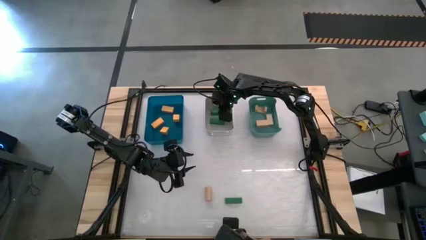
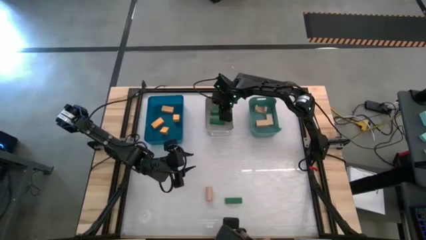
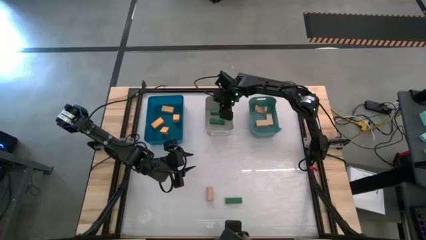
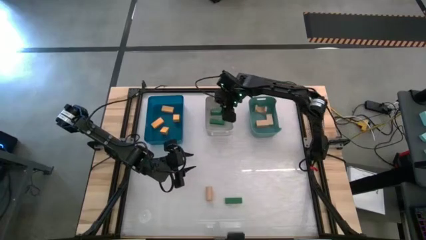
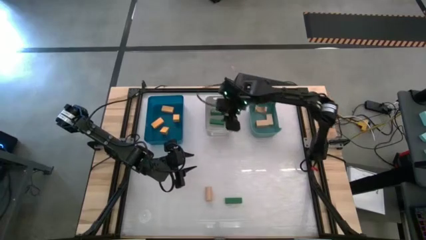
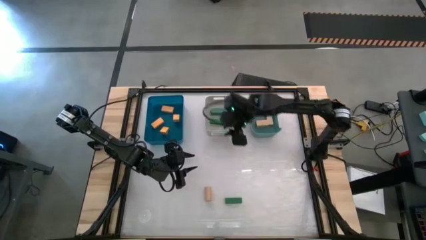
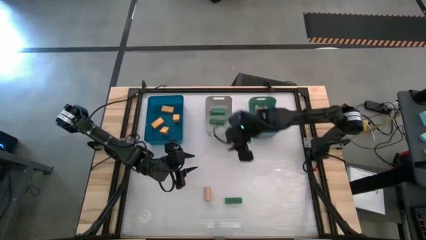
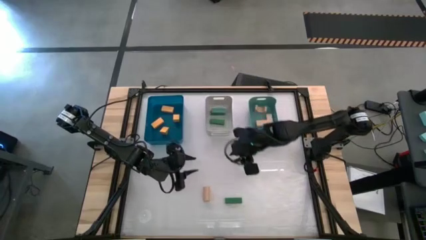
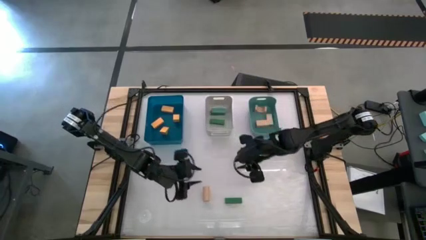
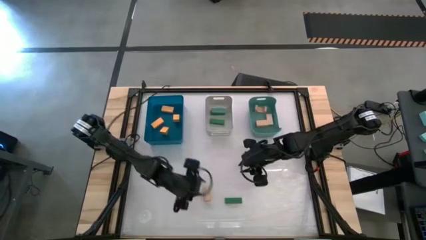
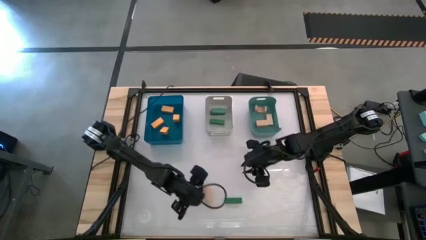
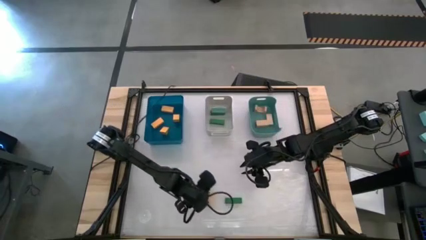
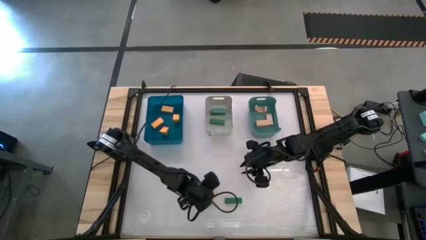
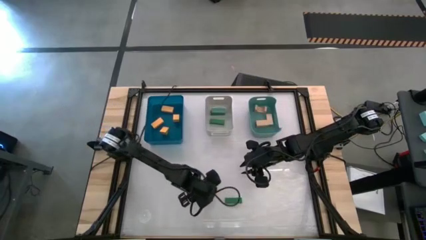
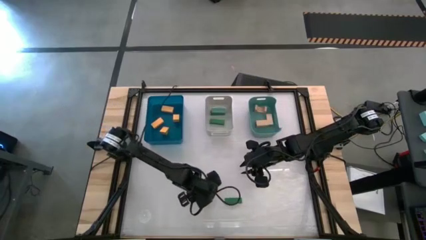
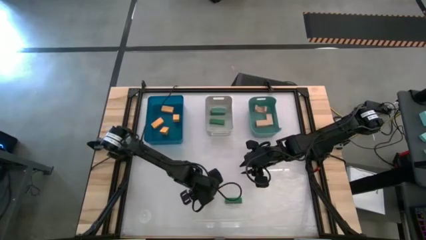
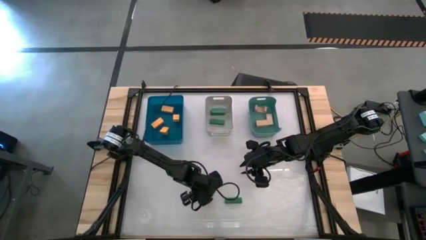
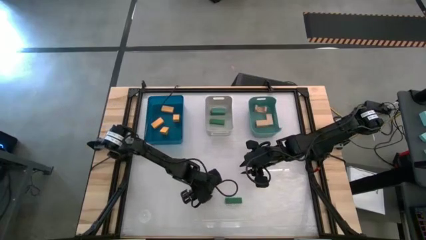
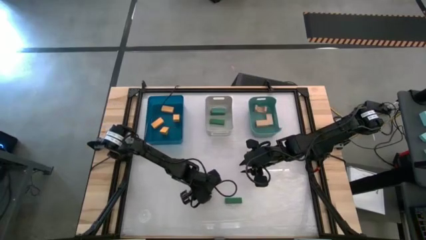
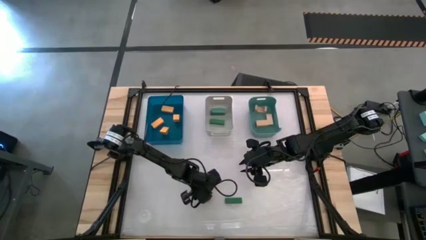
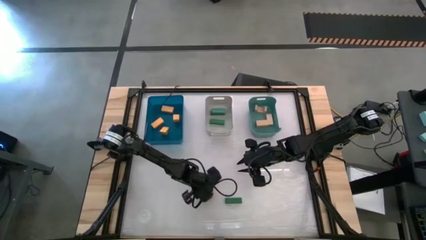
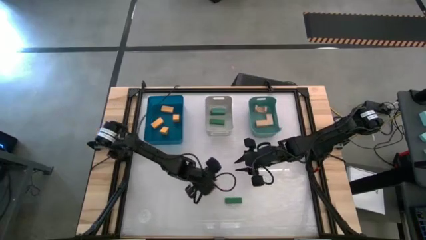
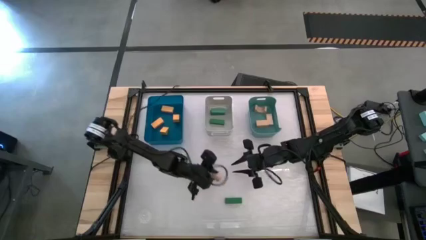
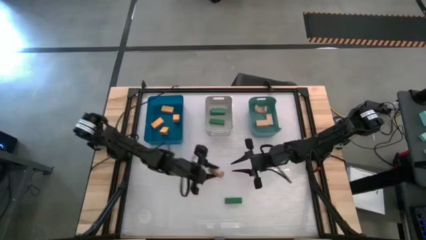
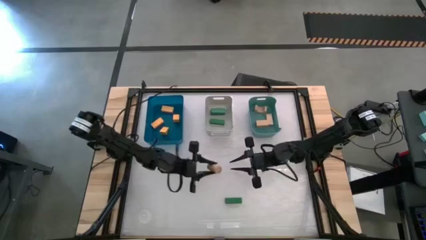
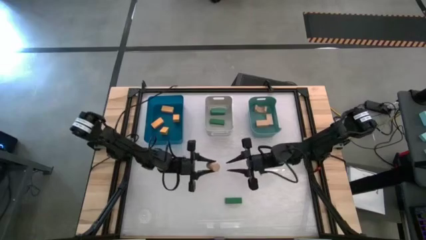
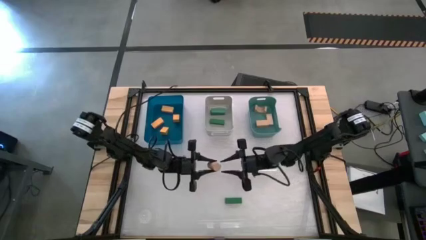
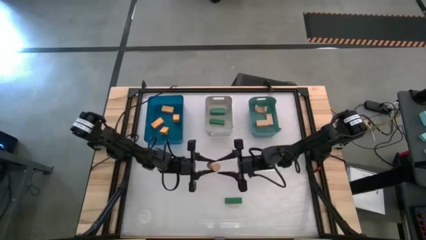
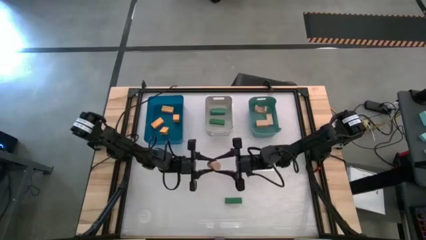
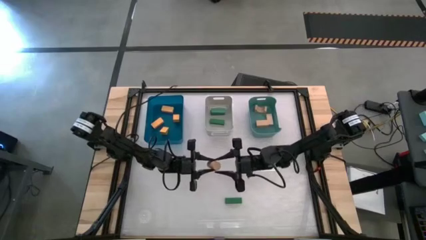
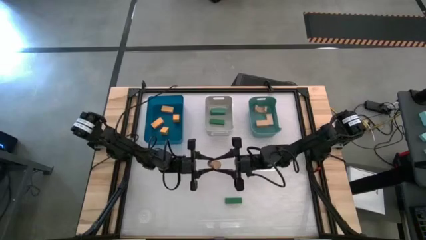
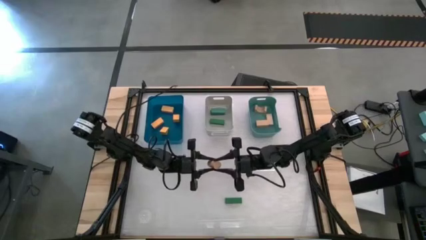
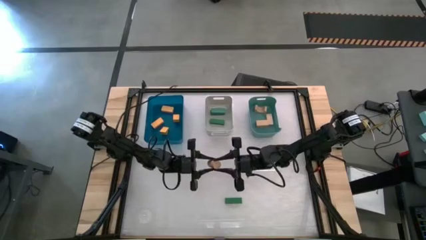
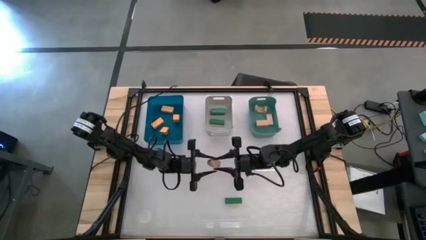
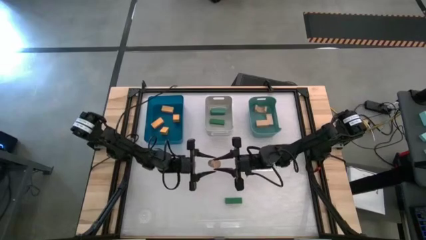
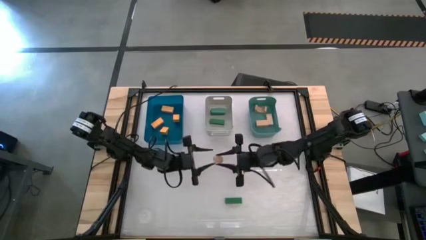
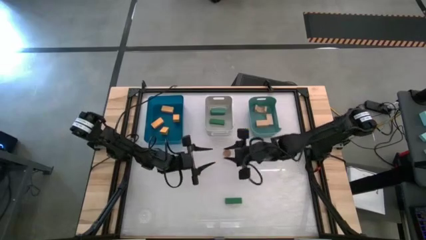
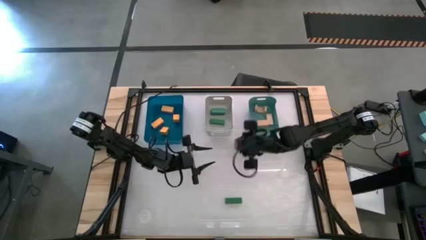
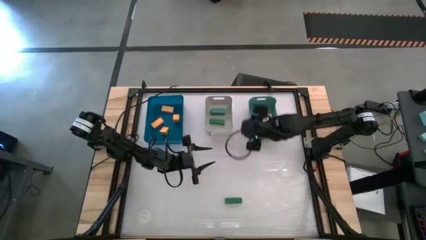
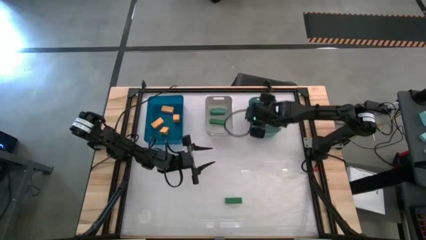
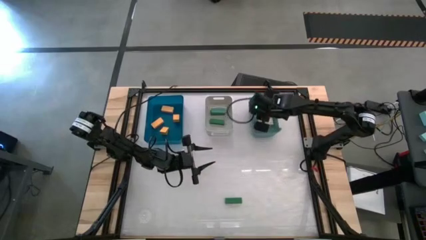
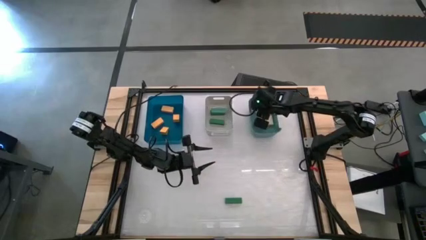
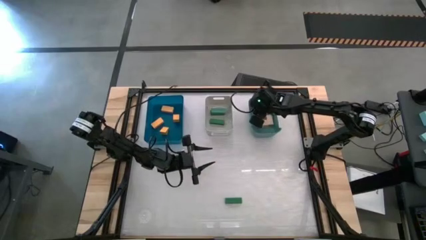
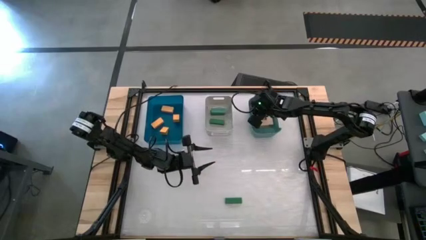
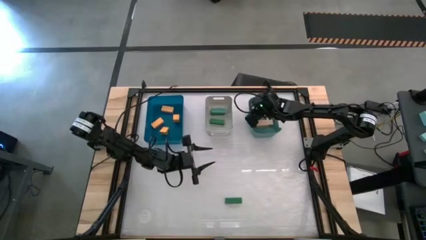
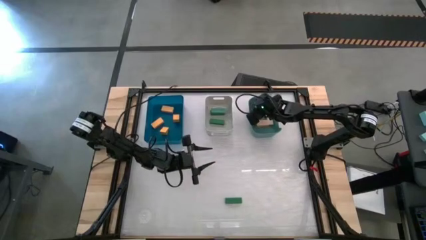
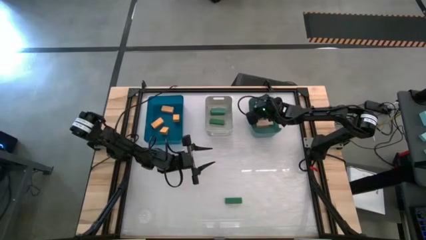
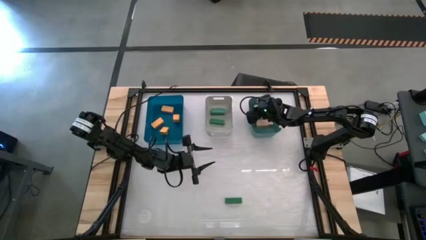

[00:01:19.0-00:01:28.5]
Task: Sort & place blocks by color
Put the brown block into the green bin

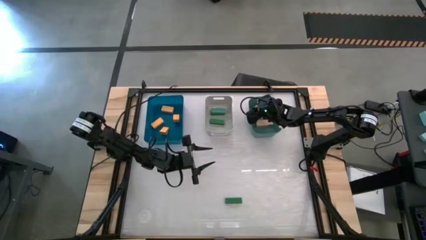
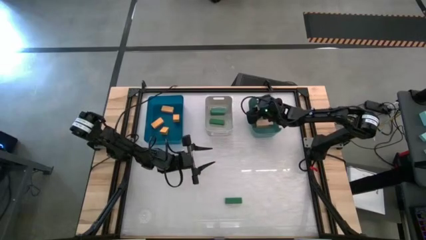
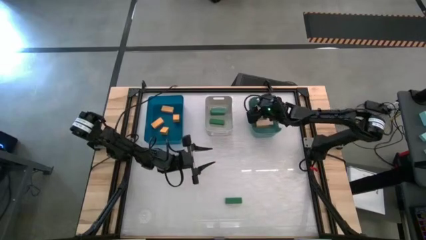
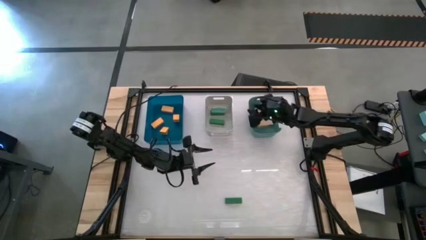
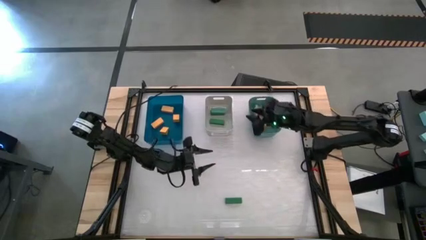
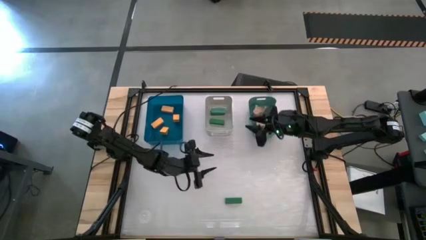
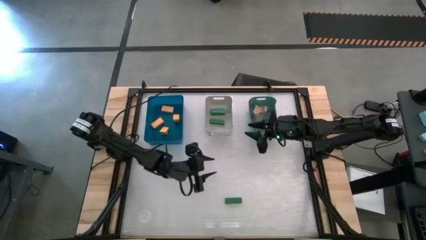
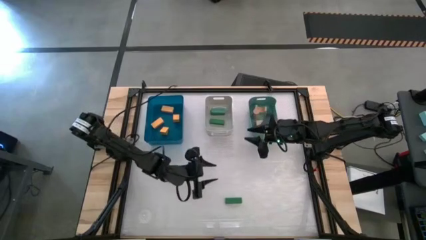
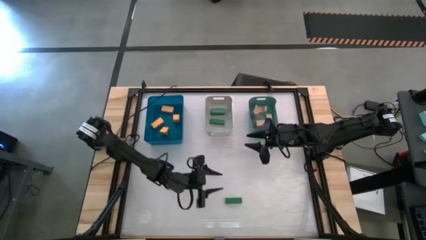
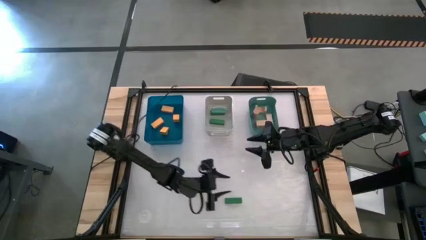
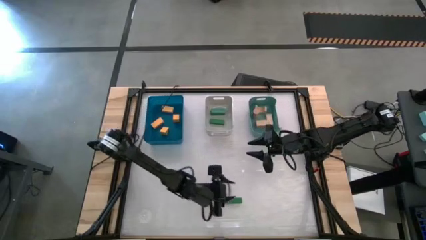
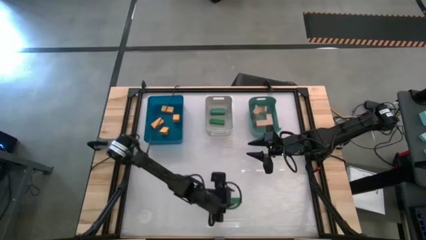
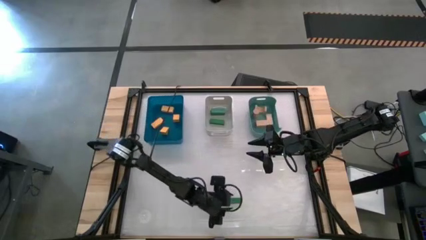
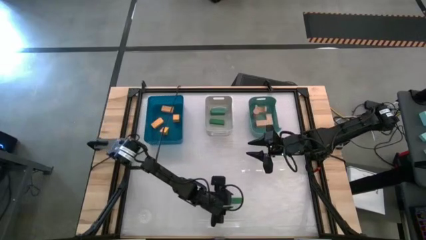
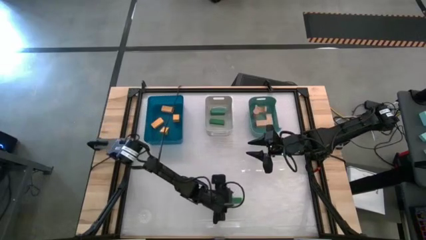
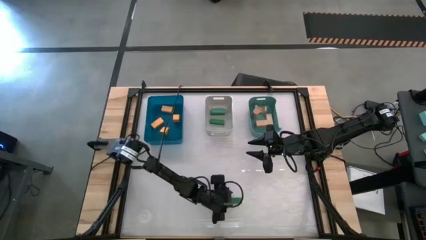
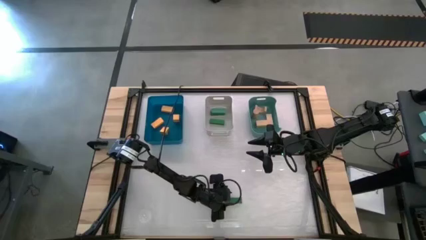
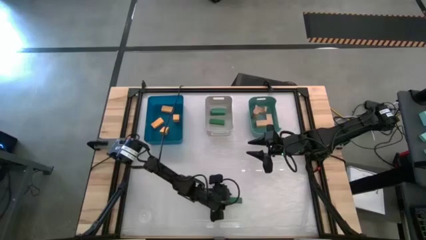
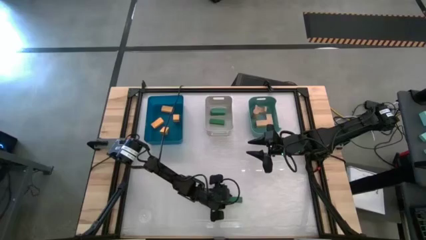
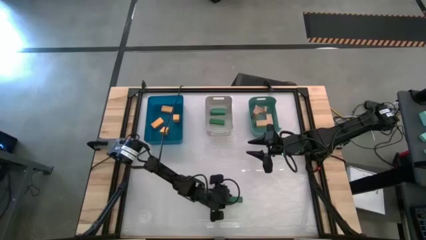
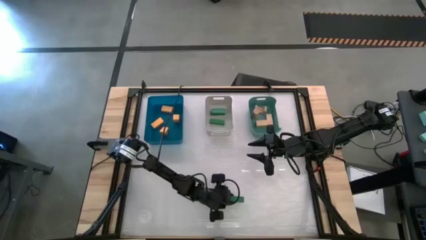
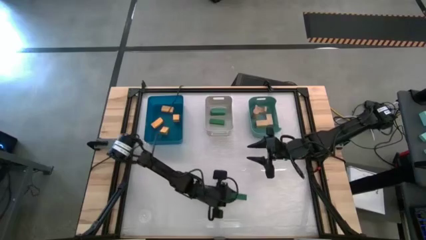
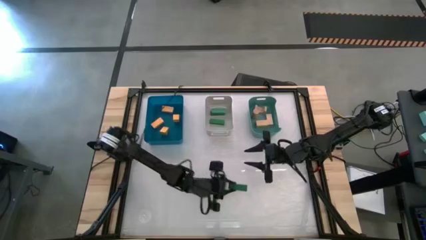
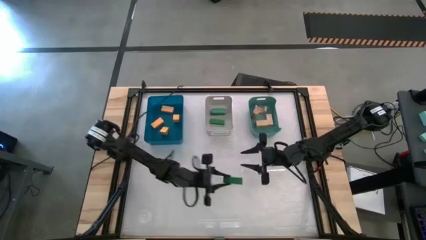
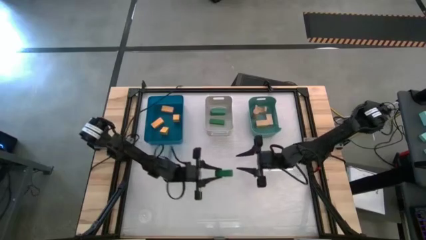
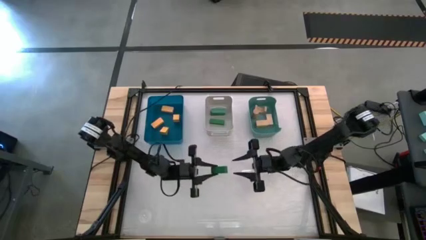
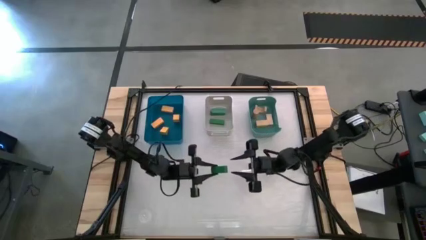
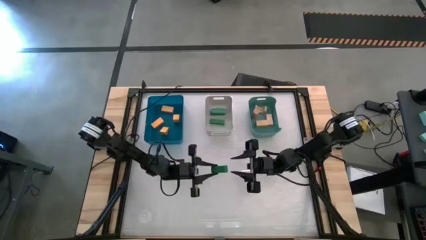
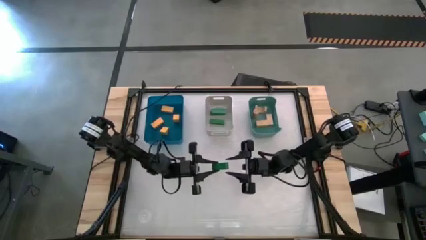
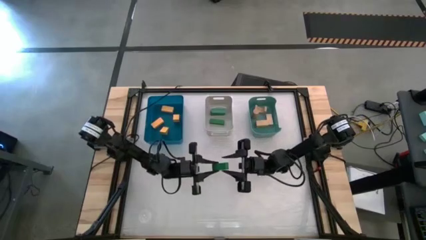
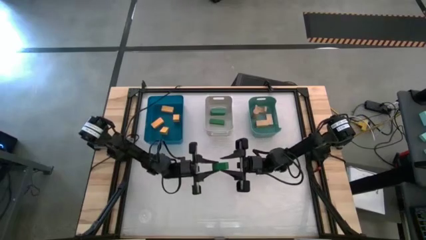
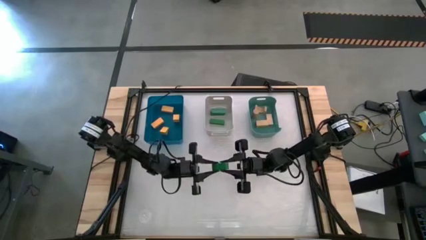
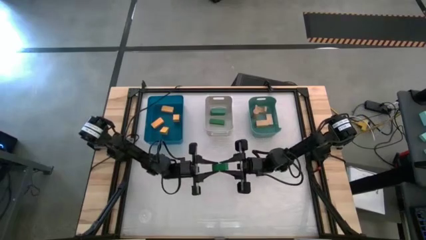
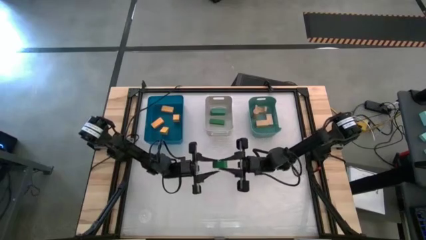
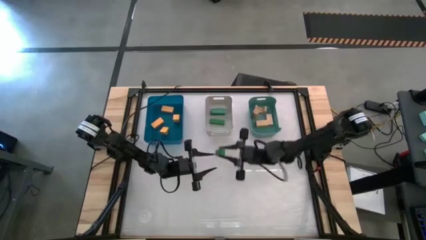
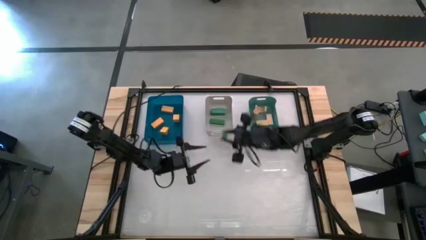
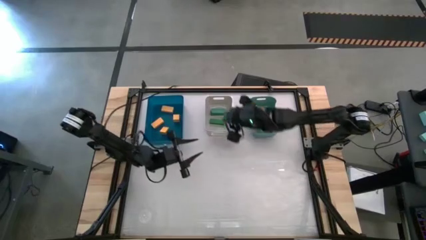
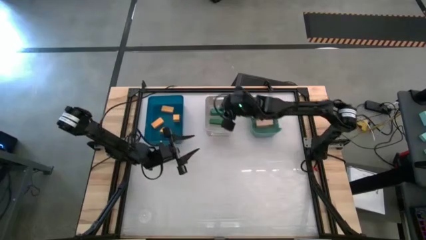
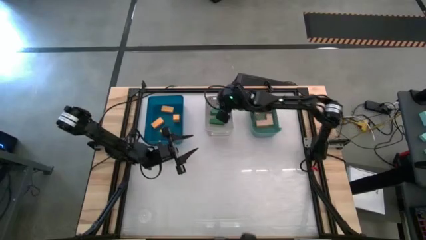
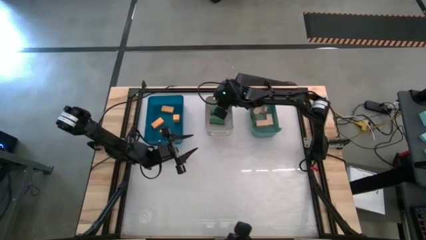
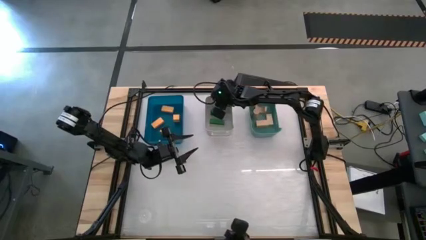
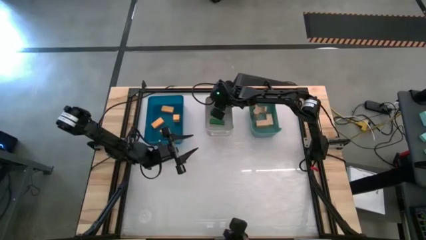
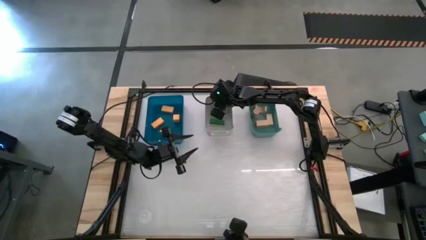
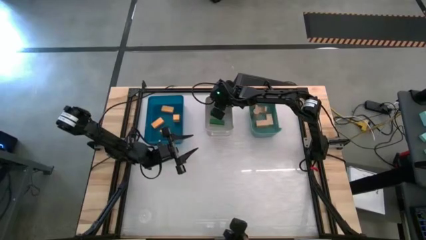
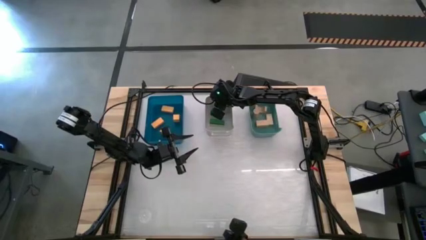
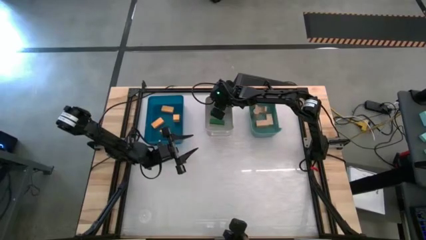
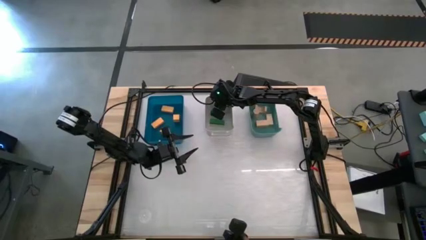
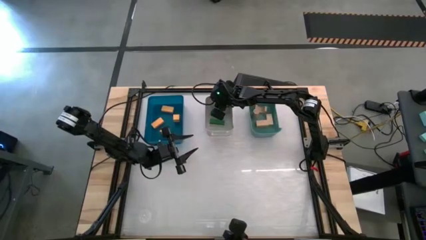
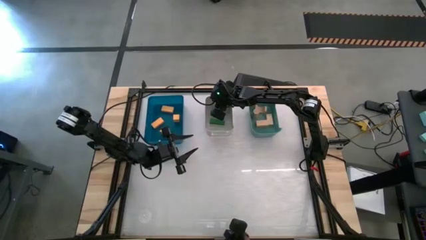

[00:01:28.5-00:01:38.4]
Put the green block into the gray bin
